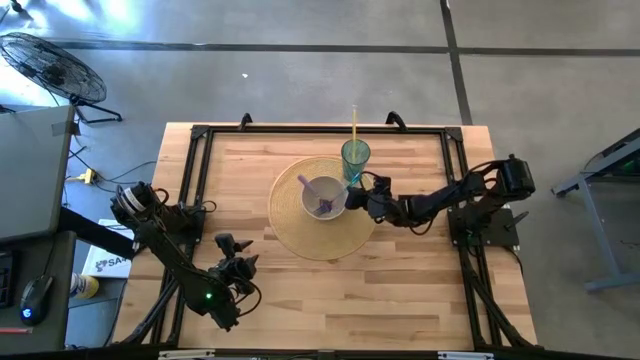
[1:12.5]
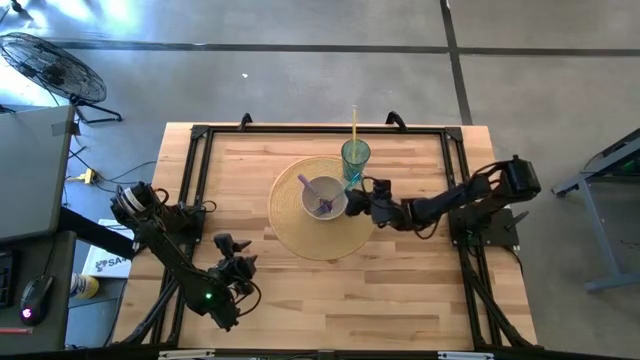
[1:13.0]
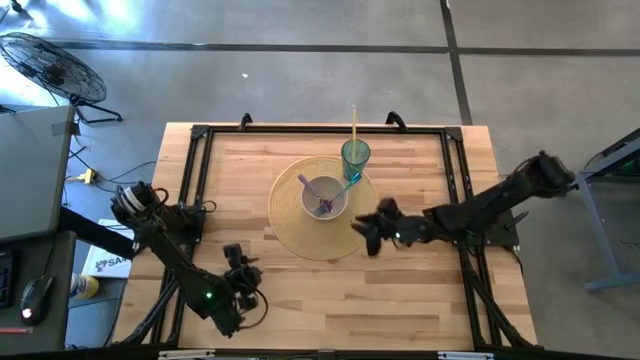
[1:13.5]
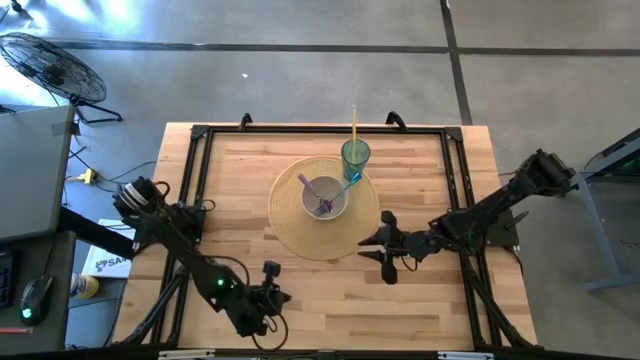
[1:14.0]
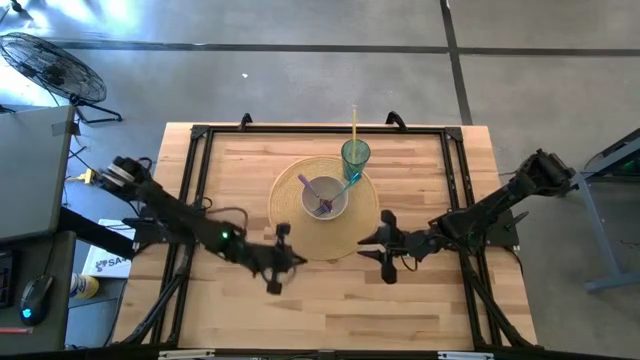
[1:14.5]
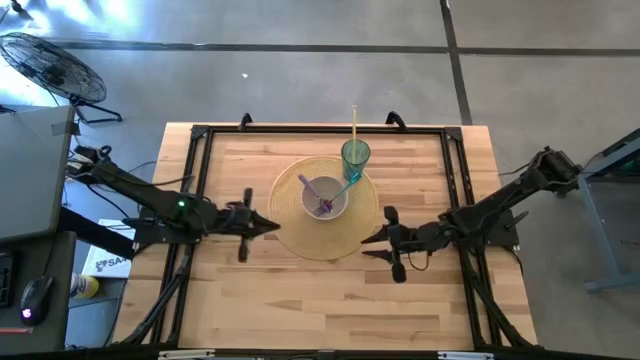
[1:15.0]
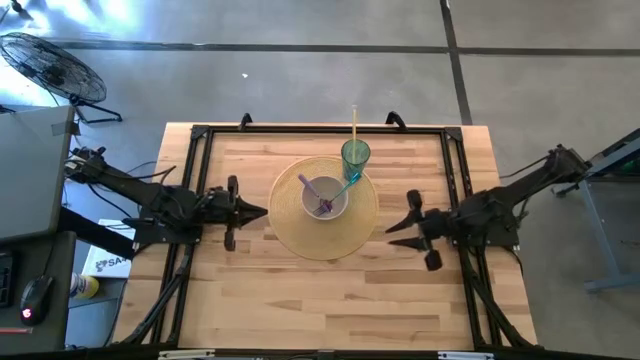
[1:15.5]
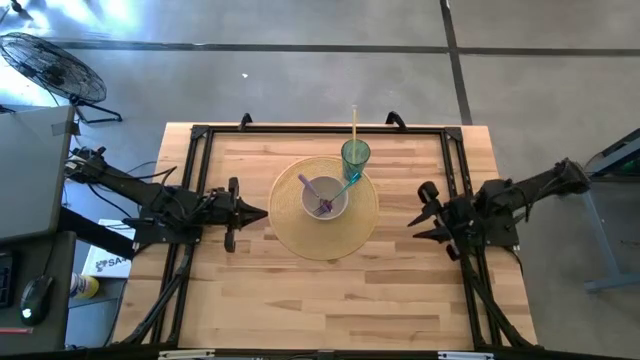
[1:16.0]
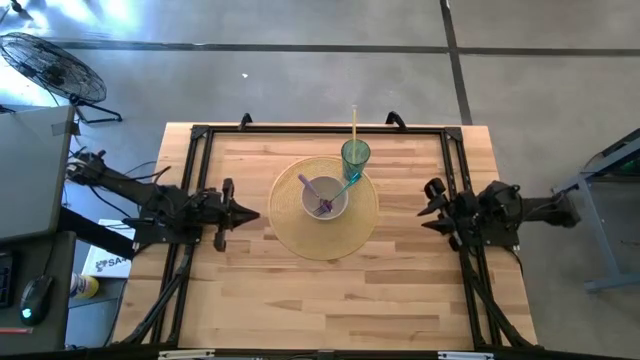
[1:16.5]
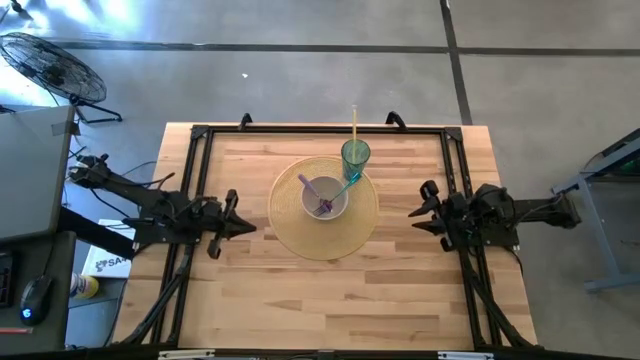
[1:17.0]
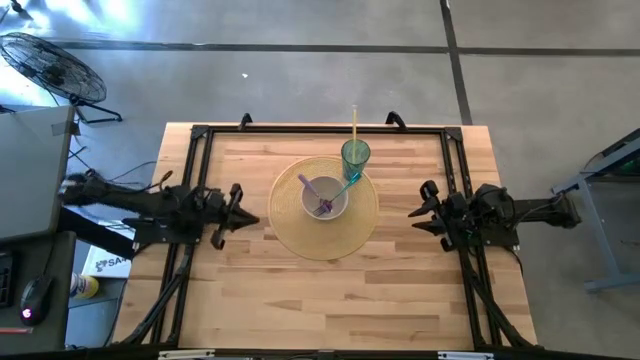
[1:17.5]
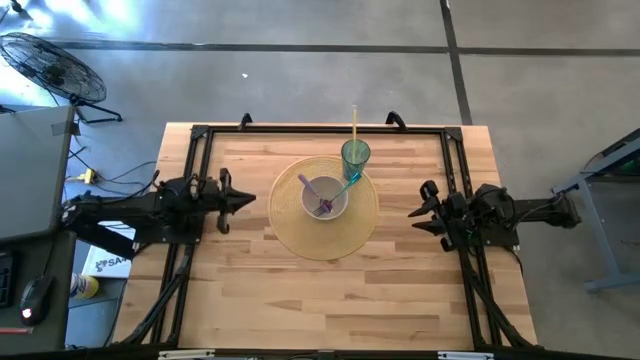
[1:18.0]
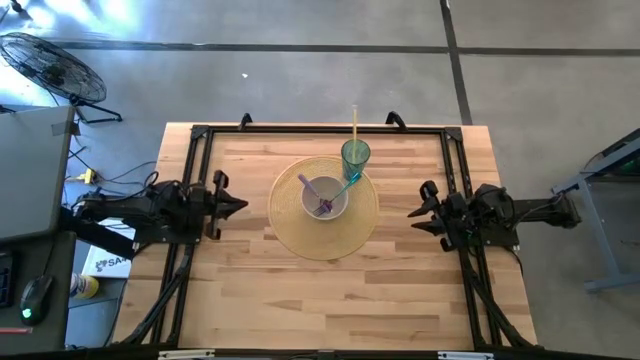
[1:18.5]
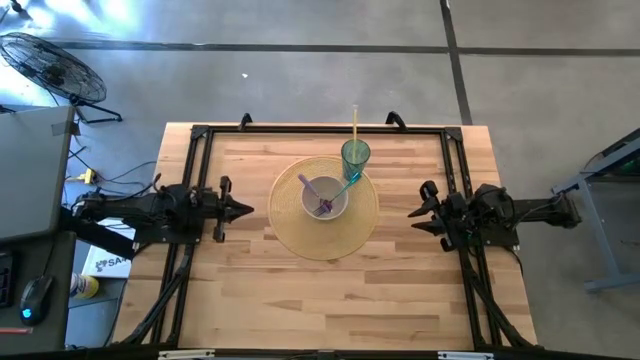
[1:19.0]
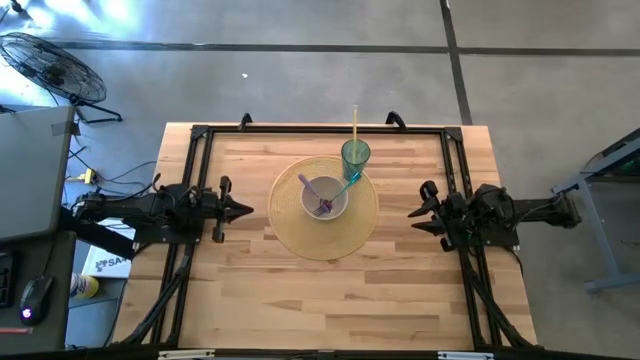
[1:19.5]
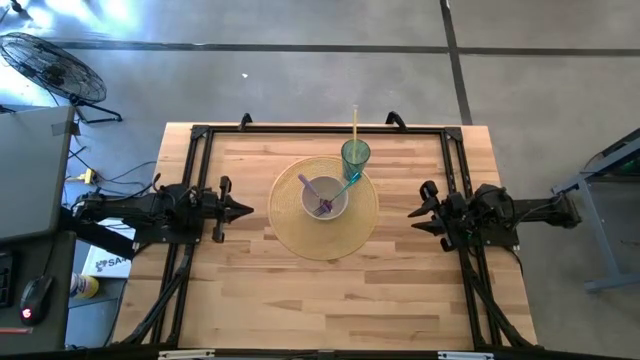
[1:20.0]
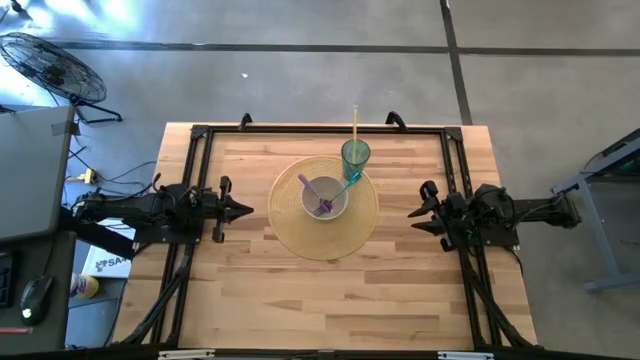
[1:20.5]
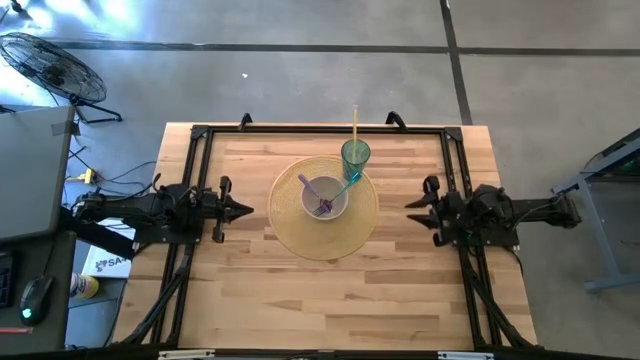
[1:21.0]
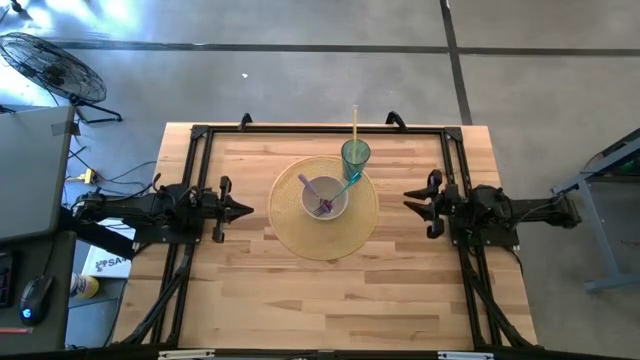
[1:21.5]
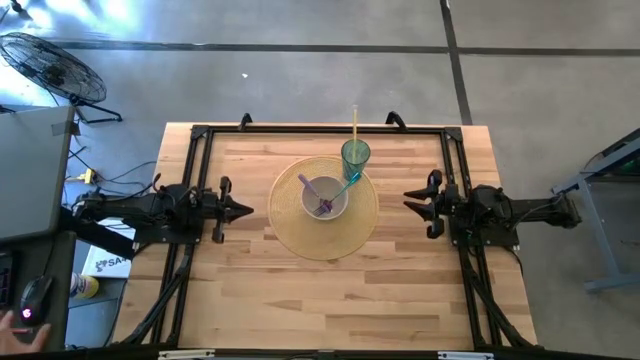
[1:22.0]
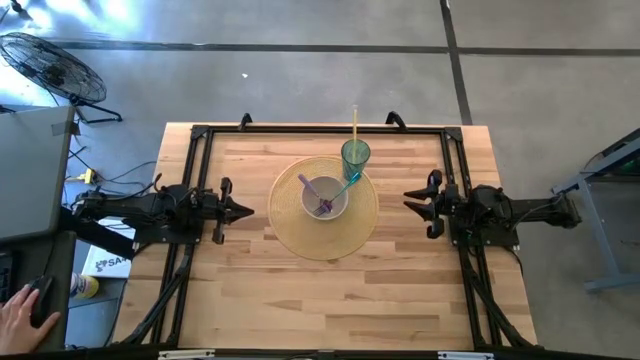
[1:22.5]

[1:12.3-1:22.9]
Task: Pick & Place Utensil
Return to Home Position

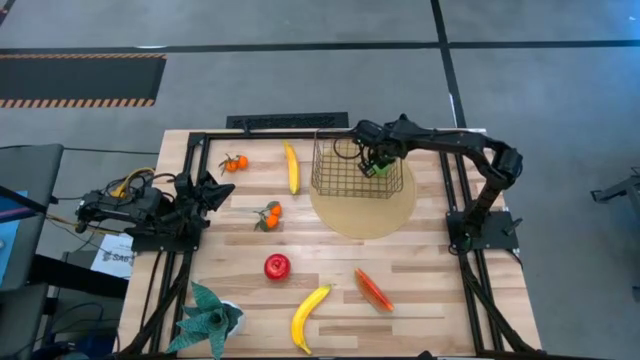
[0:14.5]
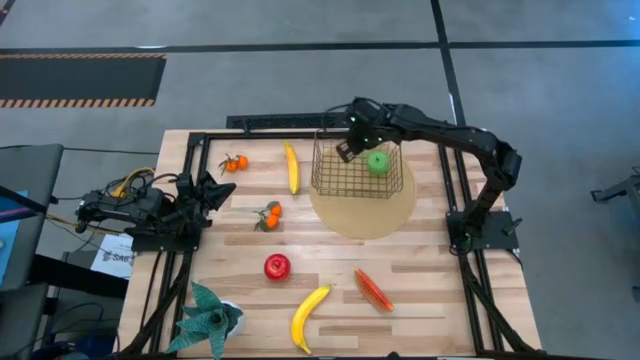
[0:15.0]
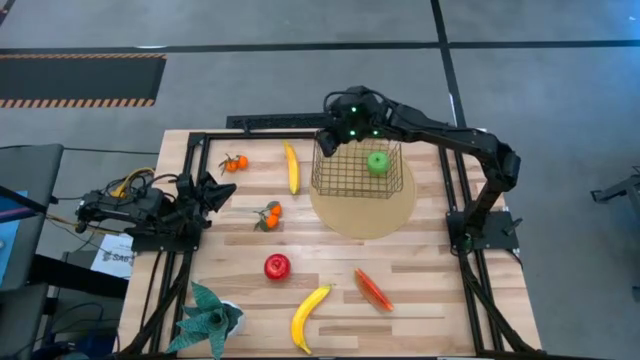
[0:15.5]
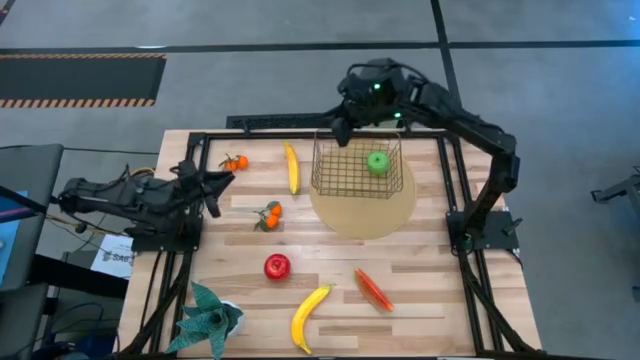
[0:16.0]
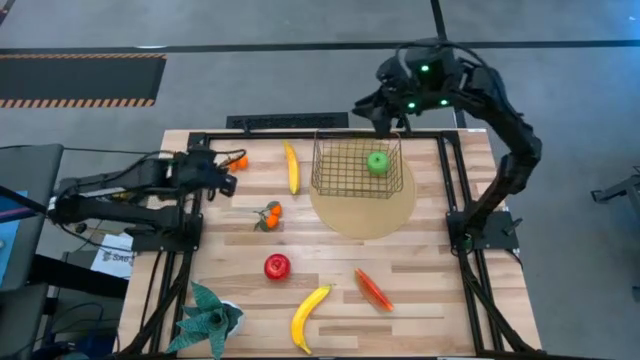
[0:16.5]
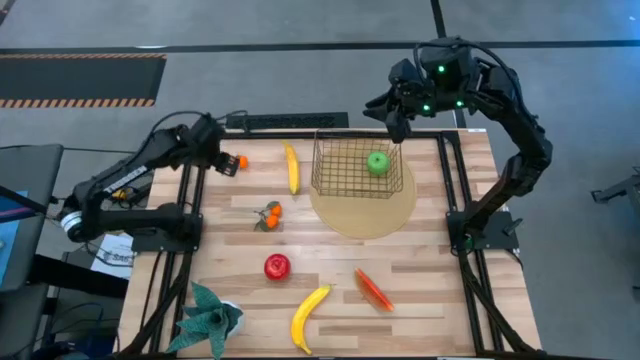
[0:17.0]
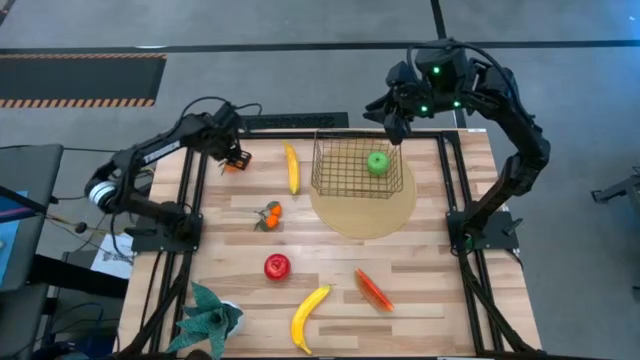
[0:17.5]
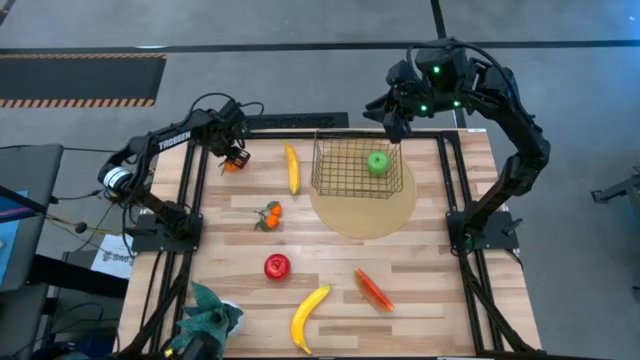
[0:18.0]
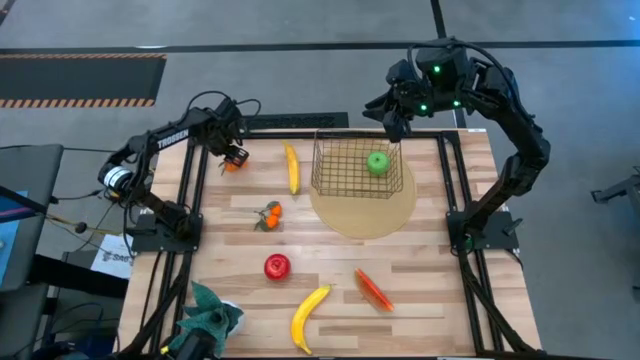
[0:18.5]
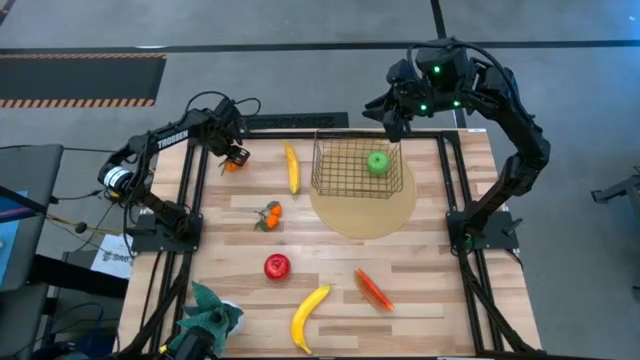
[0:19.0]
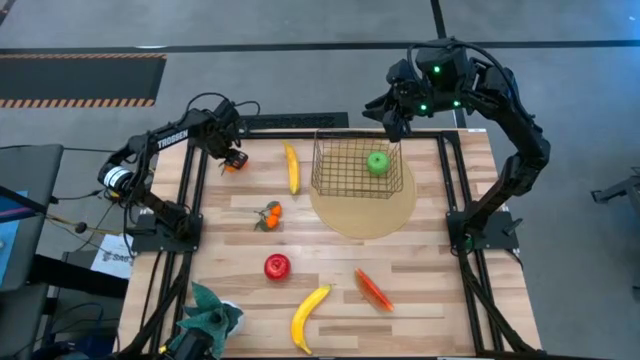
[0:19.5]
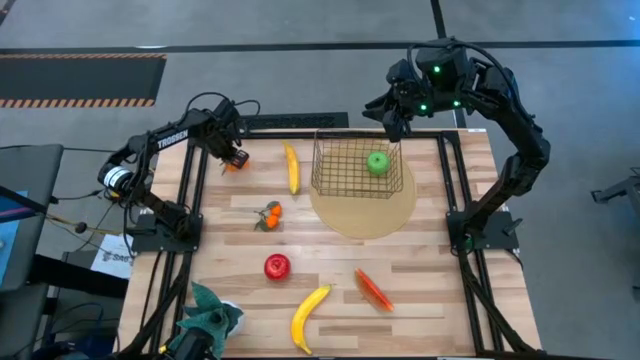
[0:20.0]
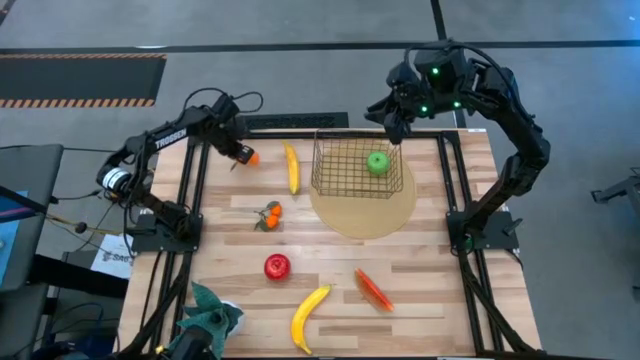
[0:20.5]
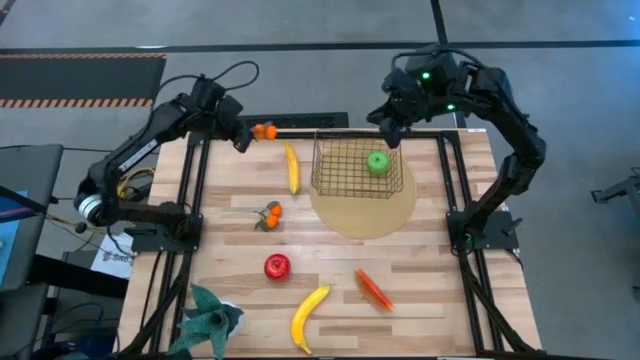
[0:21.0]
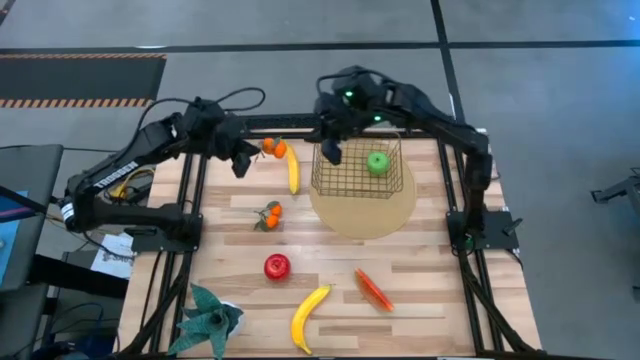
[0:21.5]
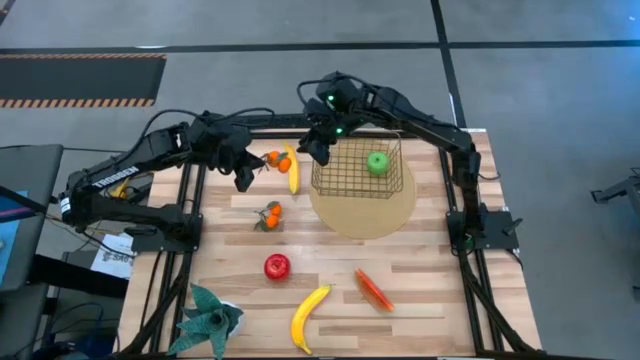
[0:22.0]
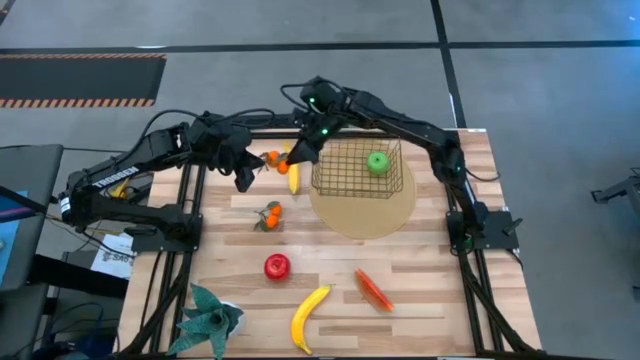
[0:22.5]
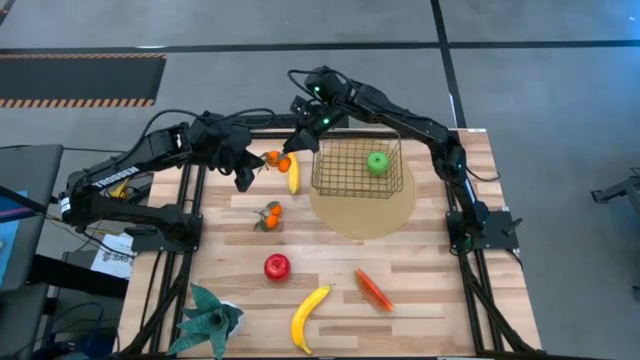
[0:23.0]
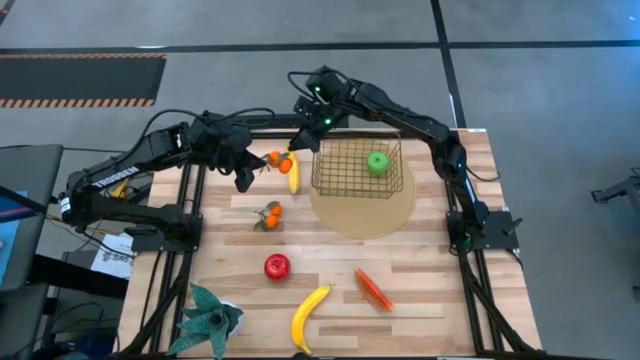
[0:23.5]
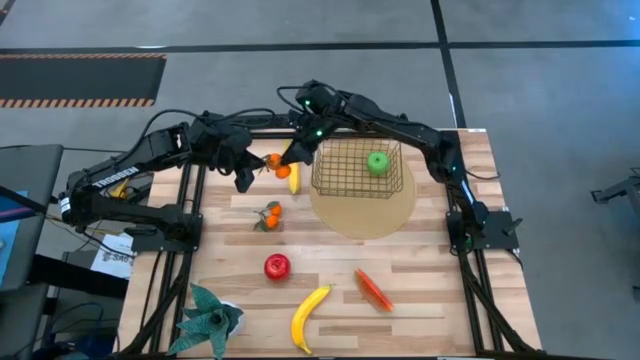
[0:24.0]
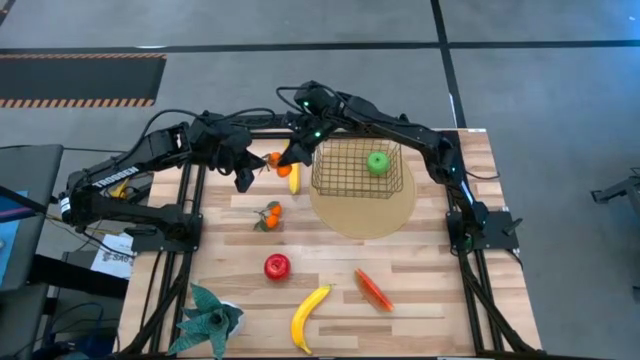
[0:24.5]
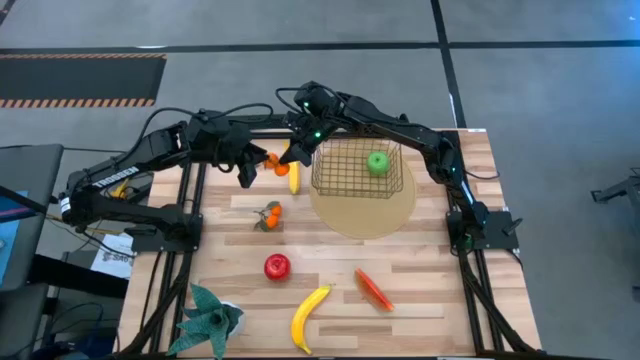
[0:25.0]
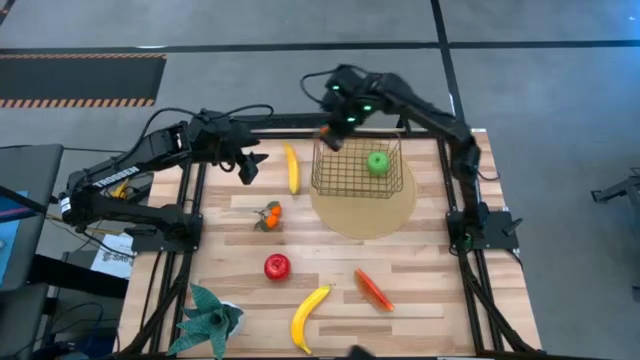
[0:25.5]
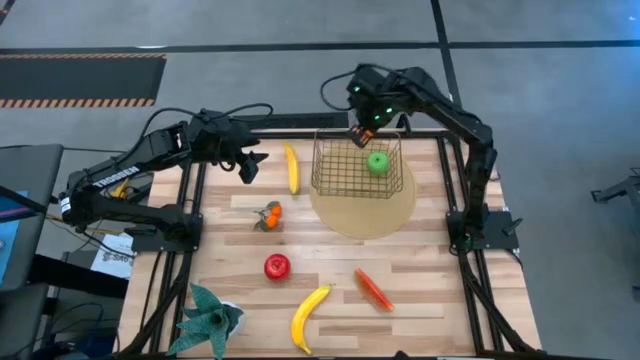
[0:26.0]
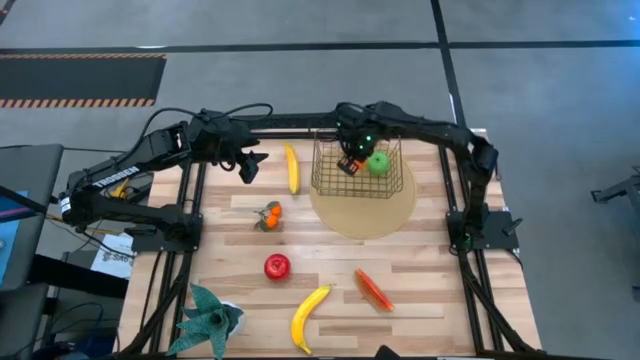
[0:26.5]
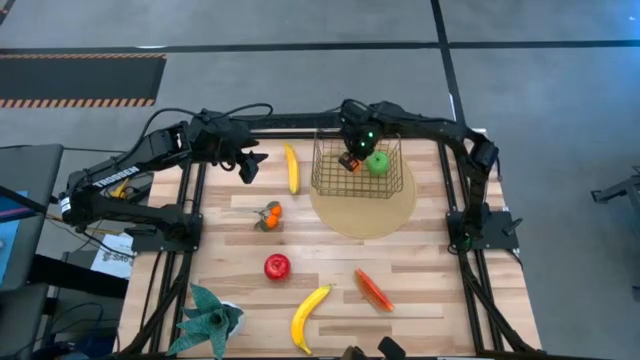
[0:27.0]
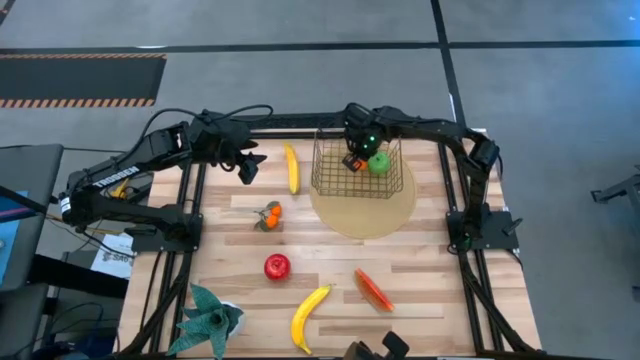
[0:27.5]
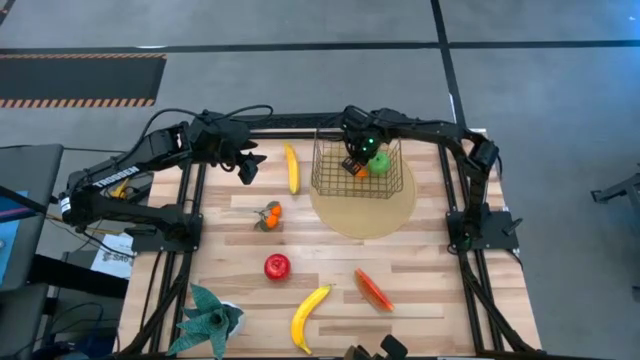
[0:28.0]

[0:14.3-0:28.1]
Task: Build produce basket
Put the top tangerines into the wire basket
